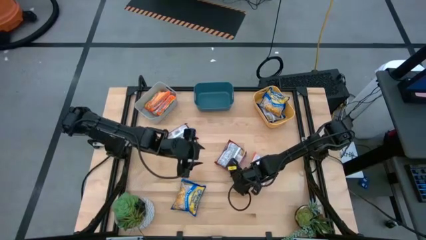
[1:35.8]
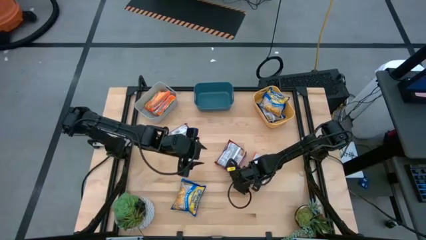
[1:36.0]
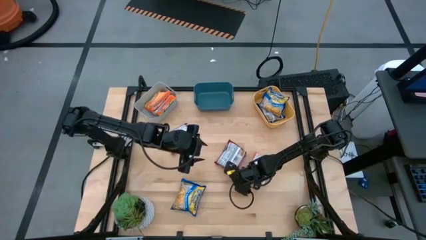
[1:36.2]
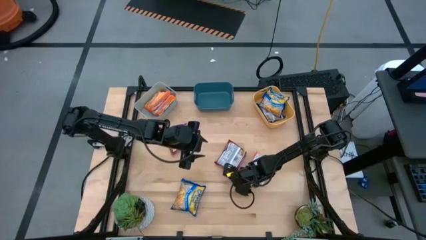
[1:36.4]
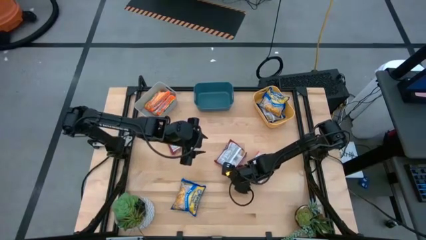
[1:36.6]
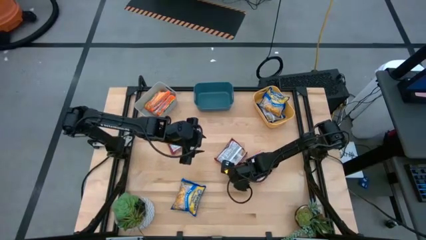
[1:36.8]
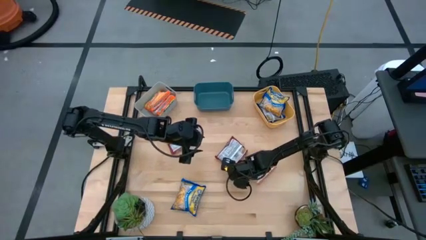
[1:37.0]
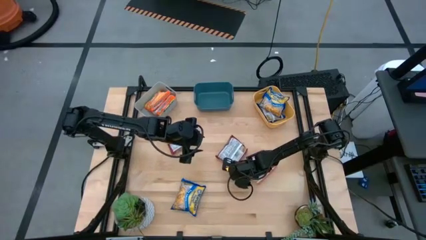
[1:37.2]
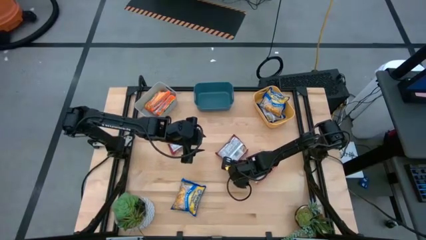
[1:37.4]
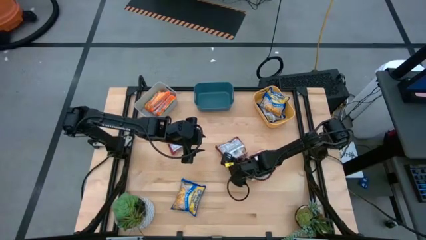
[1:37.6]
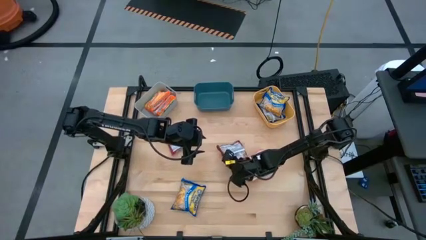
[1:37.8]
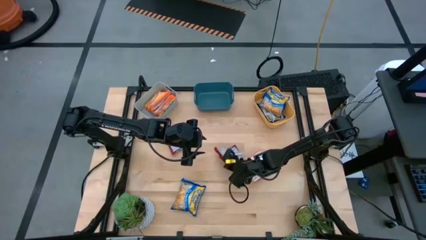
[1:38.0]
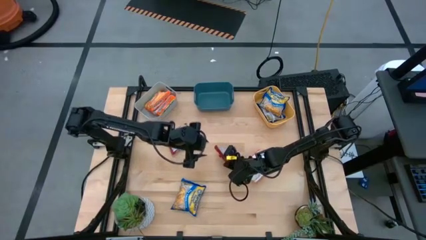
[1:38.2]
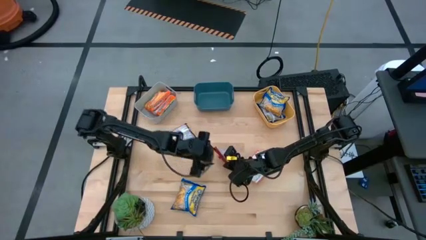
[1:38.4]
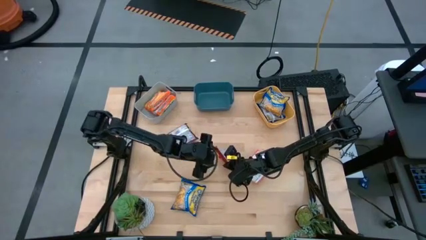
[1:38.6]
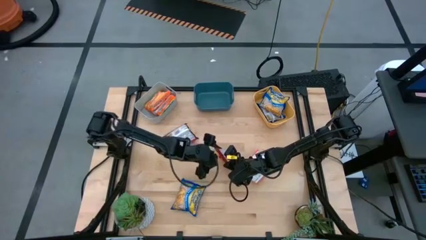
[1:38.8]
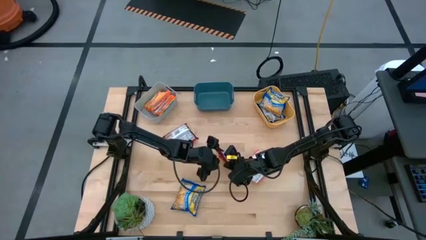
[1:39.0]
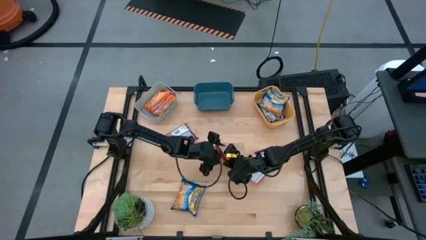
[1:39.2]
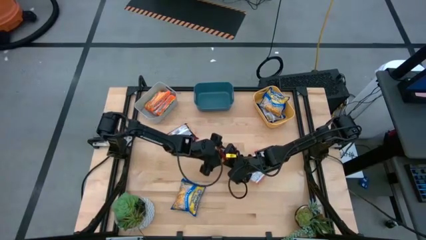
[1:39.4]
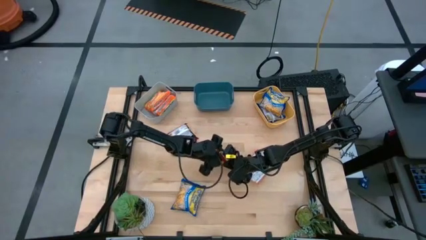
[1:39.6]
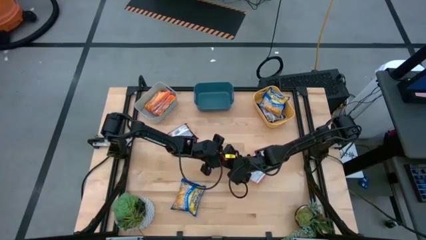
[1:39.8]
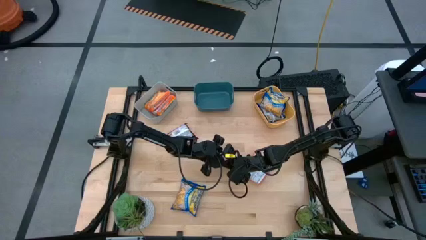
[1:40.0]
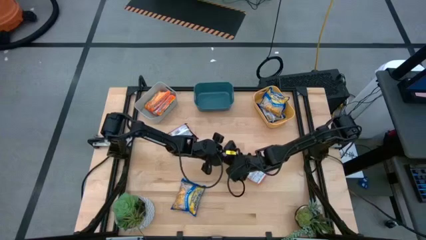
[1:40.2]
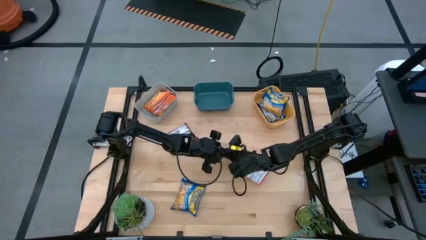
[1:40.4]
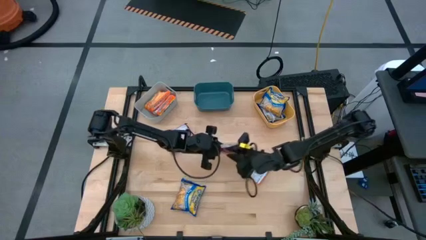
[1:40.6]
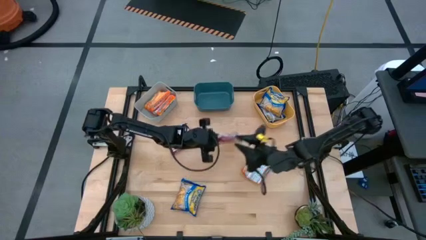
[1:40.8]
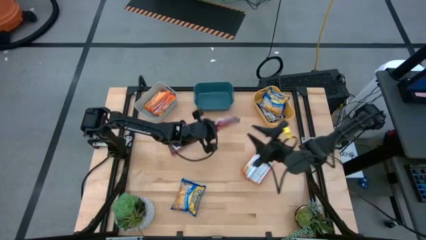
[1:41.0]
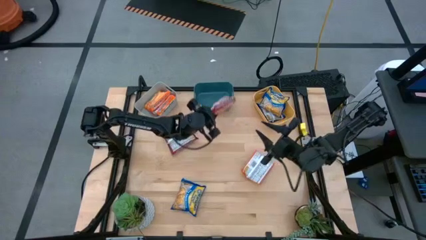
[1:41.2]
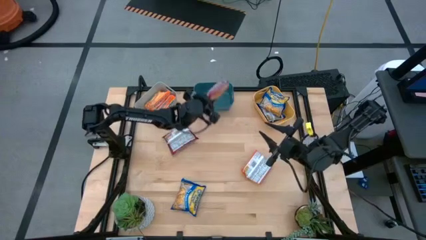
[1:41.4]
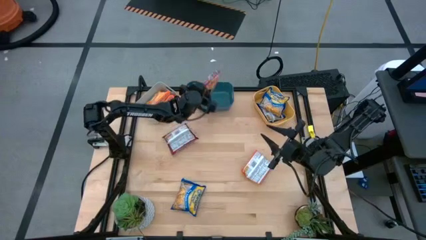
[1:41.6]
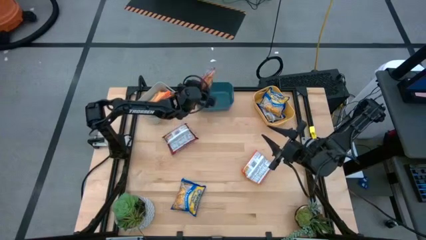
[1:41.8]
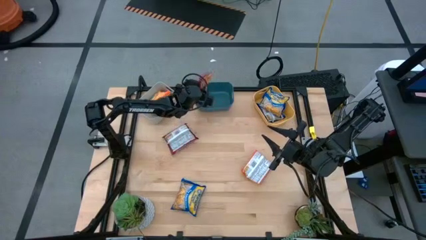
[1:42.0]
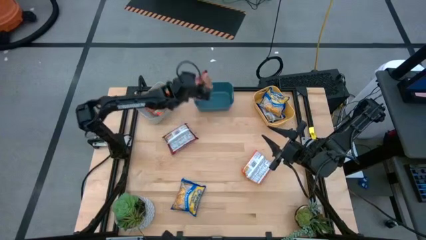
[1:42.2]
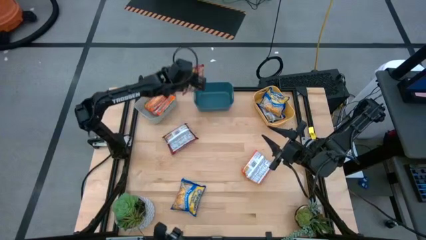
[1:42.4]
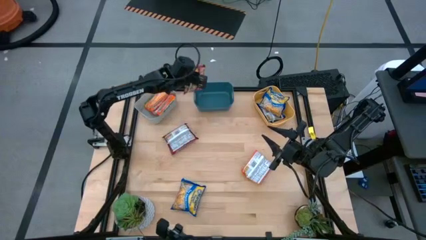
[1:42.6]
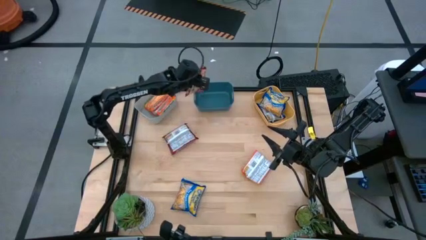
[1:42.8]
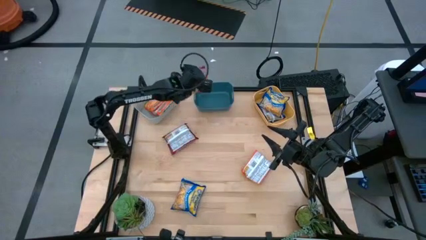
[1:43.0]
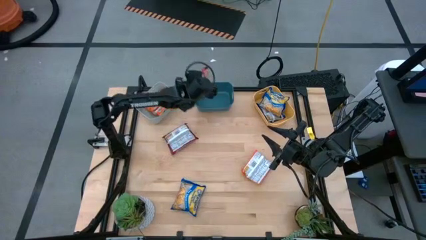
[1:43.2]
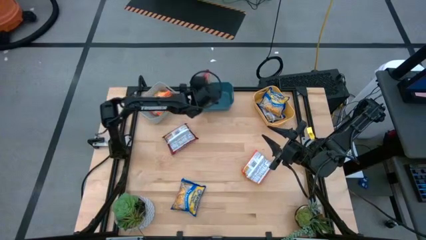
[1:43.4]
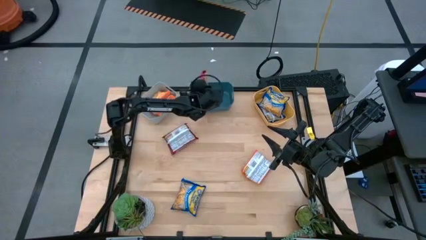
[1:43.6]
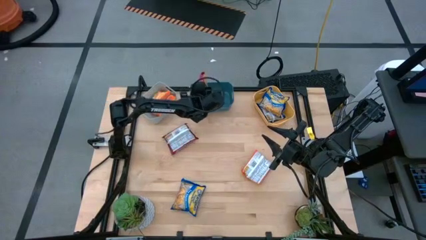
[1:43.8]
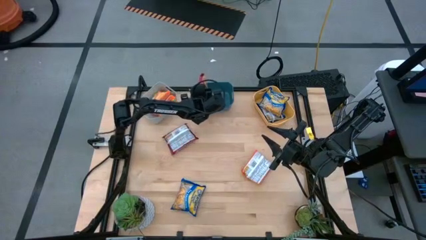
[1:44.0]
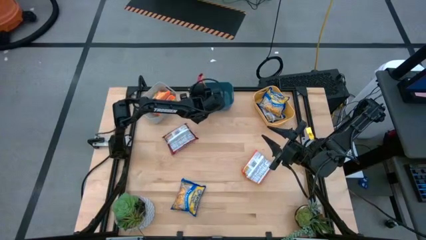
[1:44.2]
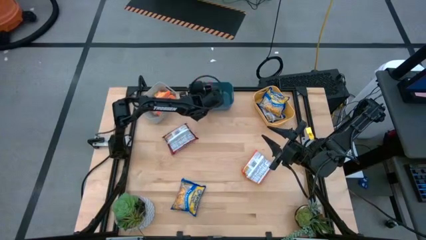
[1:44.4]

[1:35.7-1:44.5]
Task: Sort Maruchan noodles
Put the bottom red noodle pack into the blue bin

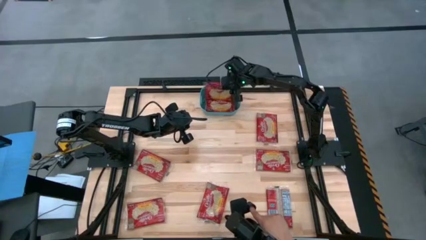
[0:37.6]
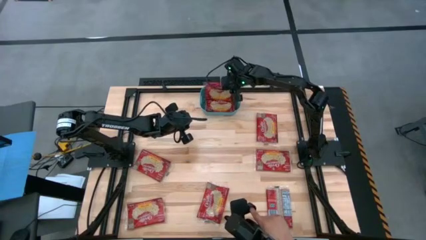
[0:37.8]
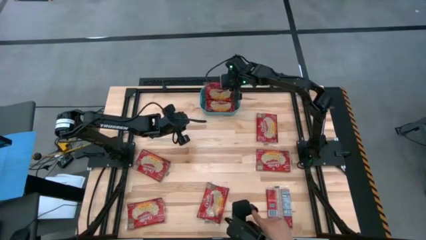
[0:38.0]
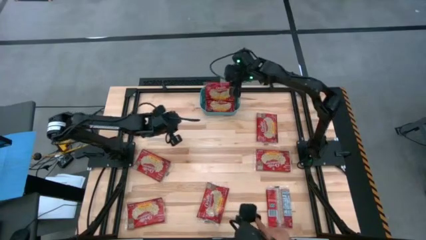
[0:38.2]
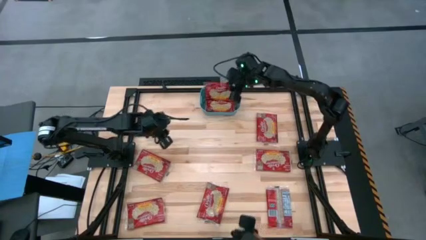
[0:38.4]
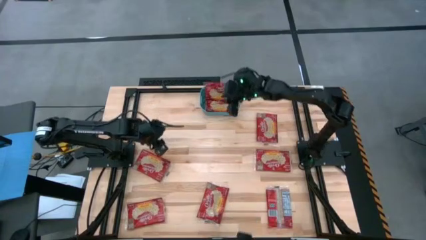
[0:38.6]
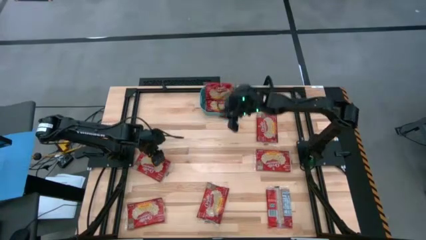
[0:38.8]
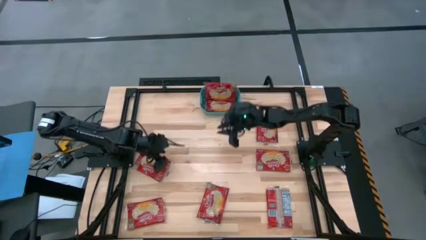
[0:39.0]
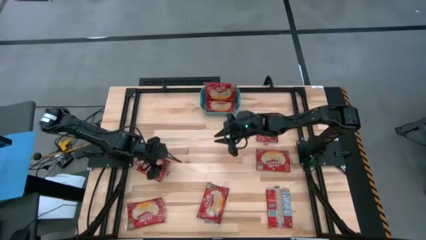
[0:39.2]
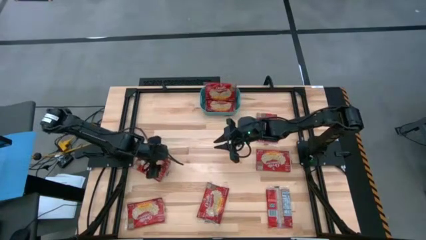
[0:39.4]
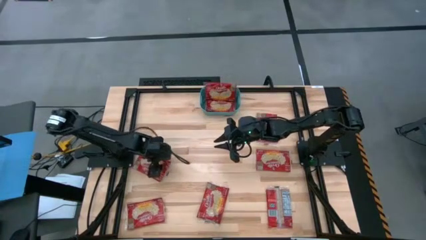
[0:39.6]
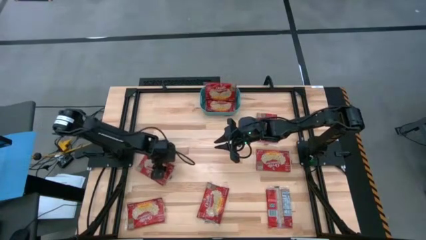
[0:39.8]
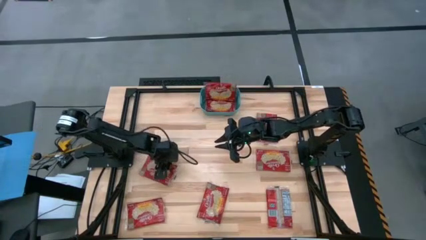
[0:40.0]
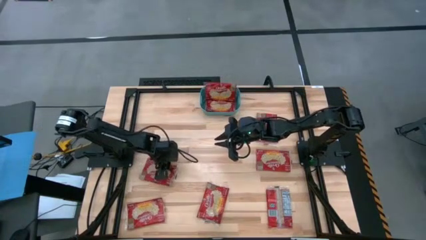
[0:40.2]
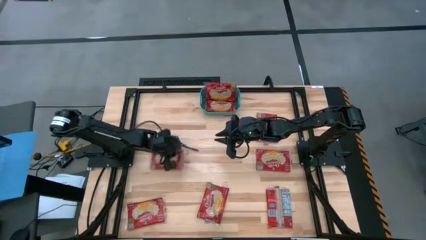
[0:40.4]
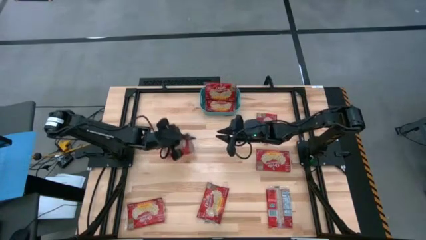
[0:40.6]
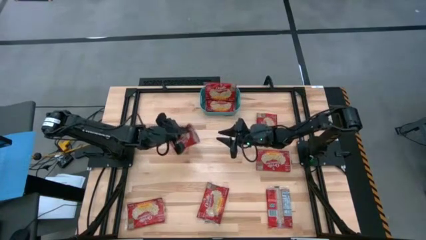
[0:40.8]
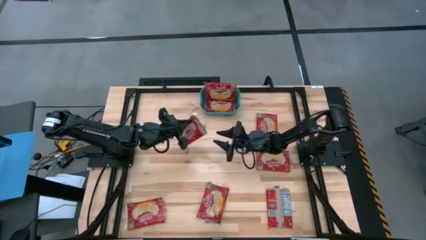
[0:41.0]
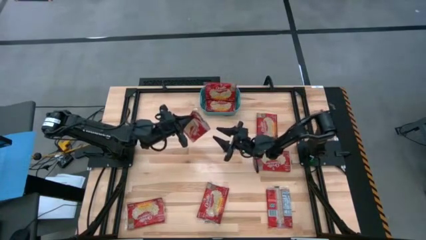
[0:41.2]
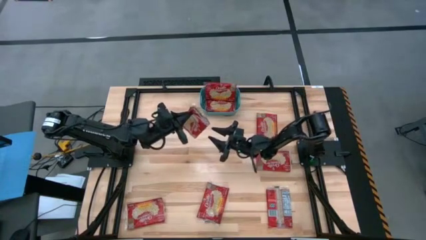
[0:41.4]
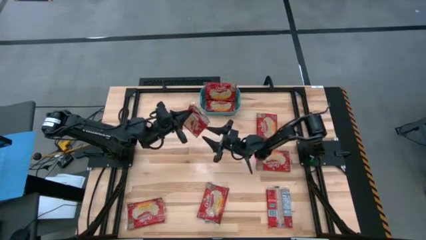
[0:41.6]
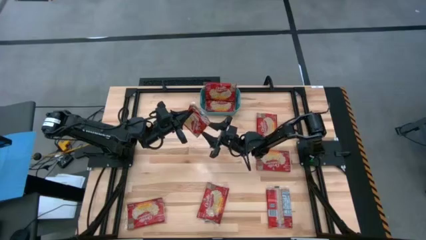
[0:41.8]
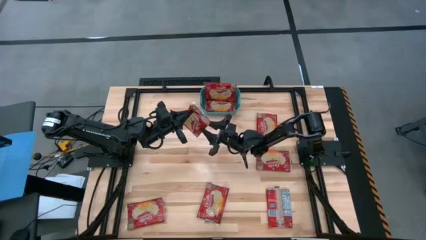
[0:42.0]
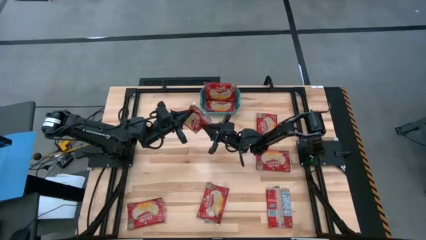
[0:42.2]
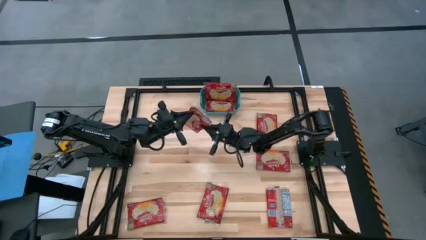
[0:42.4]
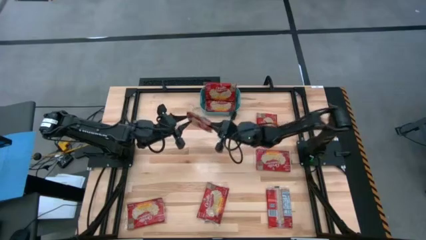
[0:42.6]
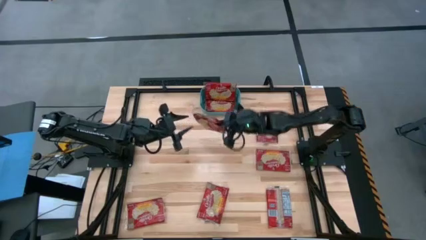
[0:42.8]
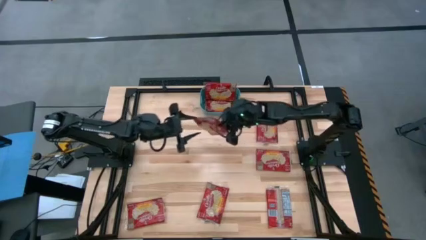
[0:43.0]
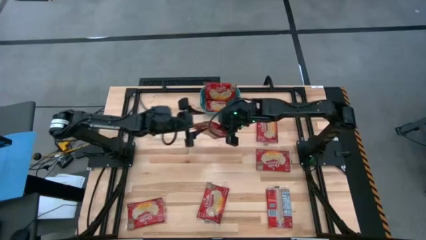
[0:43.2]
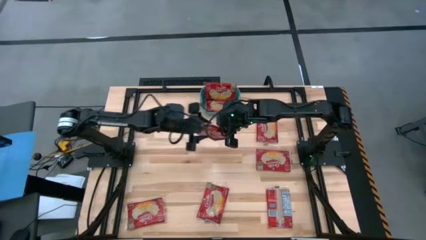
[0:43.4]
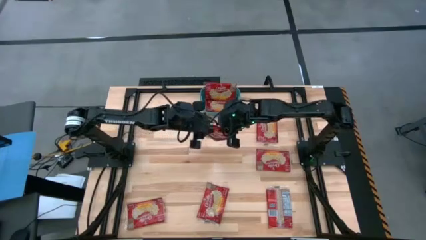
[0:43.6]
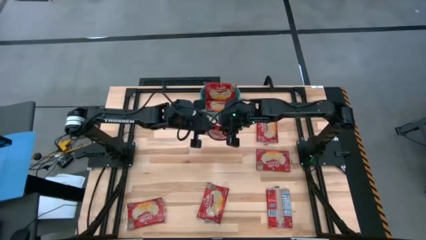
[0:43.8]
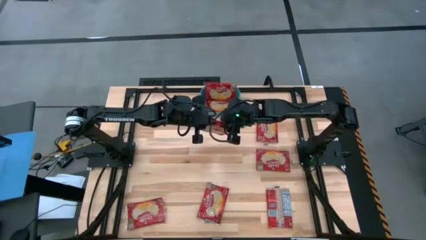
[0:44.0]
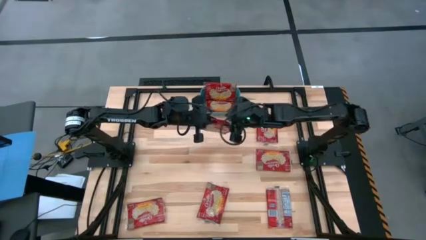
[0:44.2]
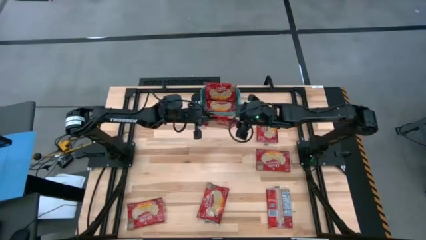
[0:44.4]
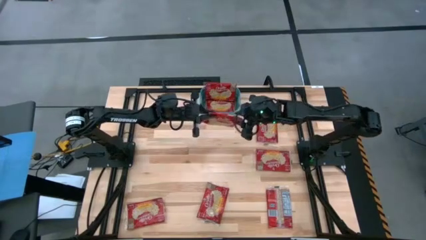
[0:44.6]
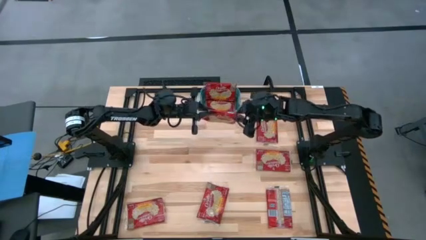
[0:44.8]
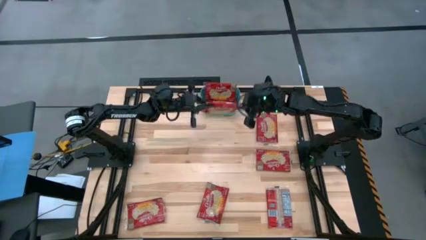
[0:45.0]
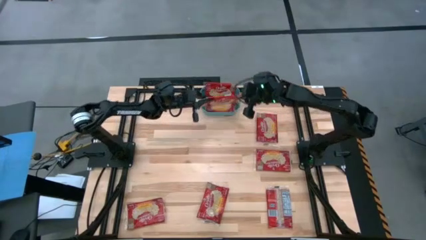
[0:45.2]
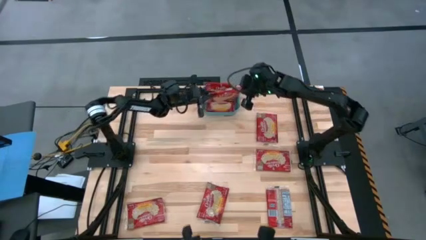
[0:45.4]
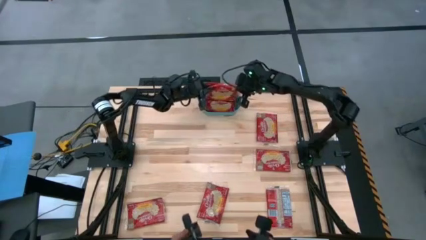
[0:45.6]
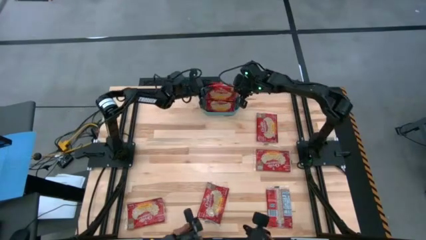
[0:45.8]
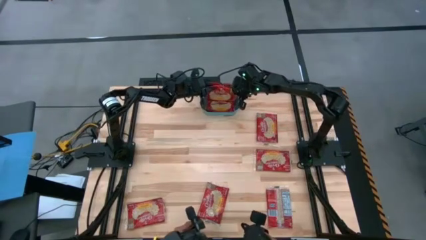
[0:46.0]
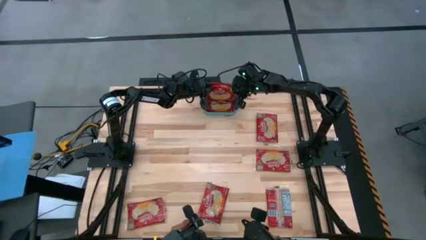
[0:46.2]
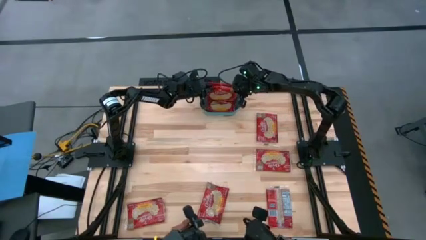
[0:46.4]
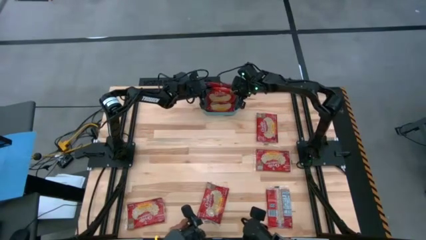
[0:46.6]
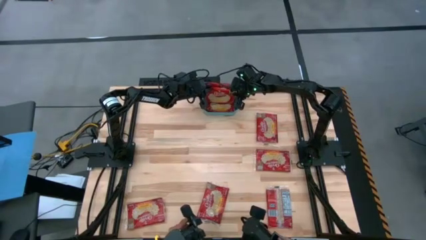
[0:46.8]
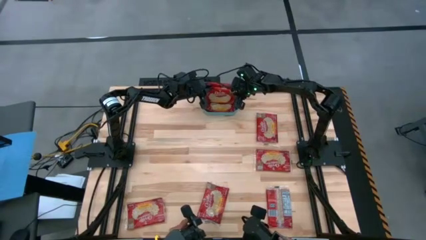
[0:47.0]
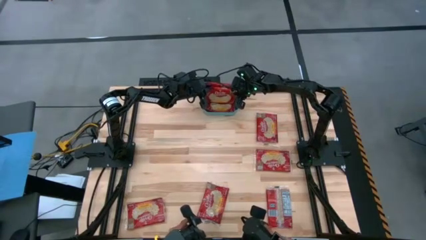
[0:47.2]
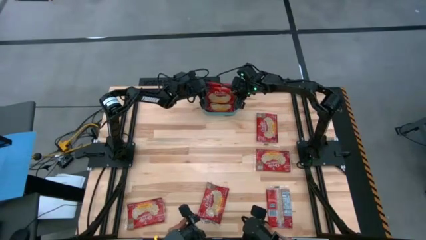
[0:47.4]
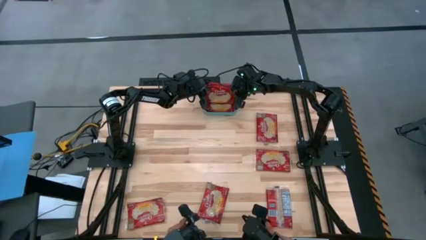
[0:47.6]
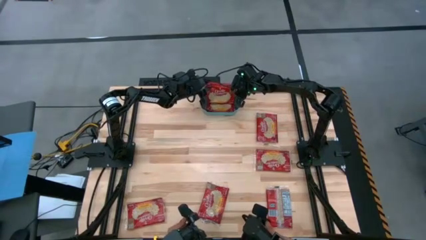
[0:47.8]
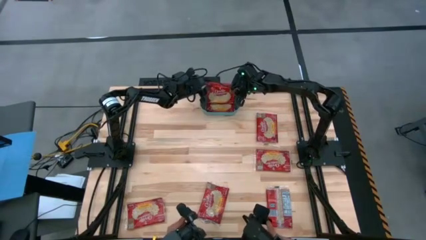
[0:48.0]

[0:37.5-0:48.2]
Task: Sort popcorn bags into baskets
Put the red popcorn bag into the blue bin
